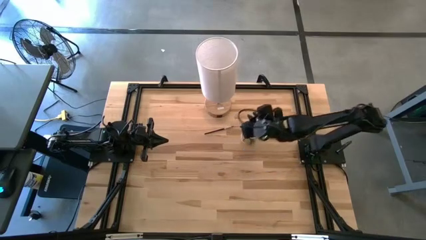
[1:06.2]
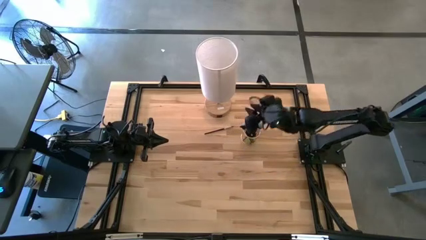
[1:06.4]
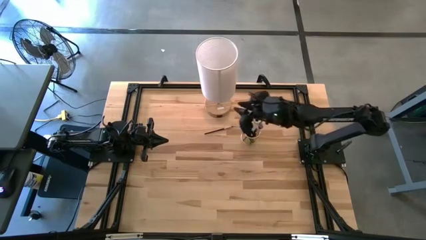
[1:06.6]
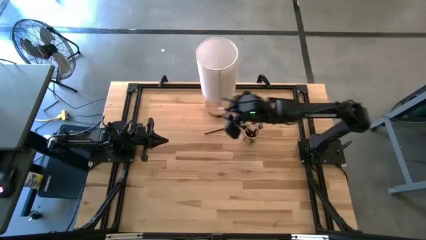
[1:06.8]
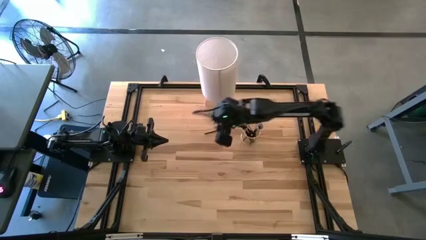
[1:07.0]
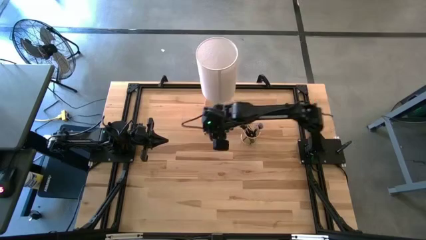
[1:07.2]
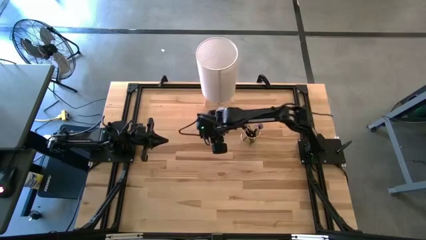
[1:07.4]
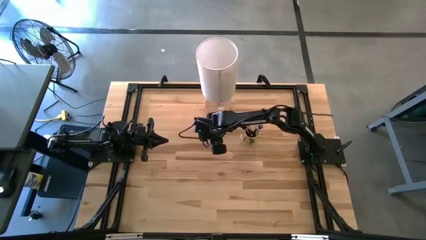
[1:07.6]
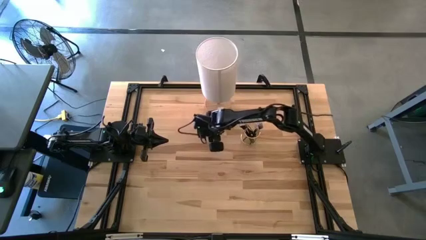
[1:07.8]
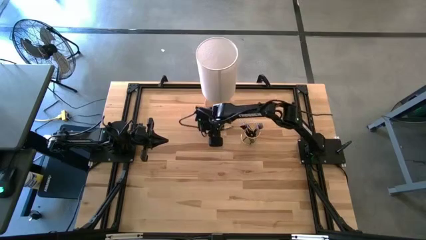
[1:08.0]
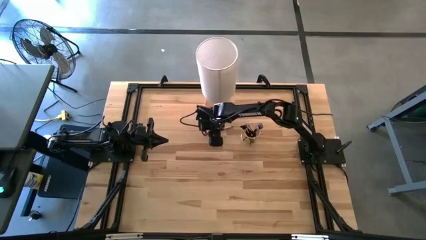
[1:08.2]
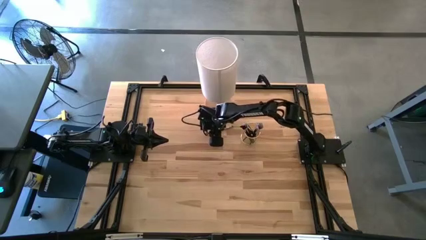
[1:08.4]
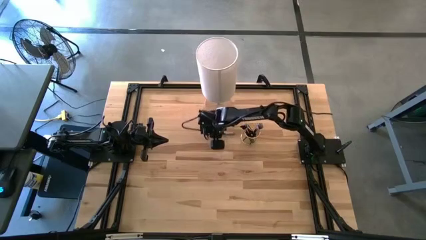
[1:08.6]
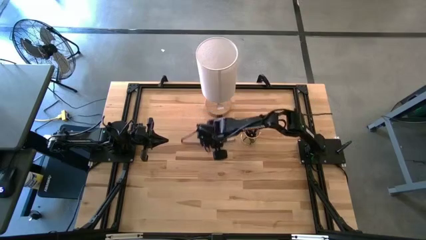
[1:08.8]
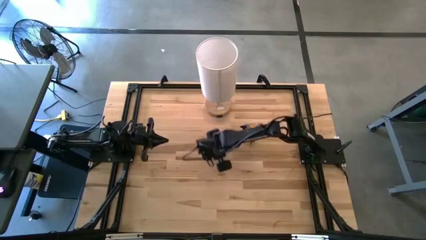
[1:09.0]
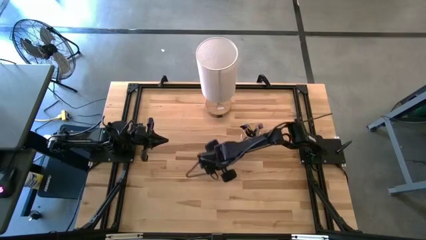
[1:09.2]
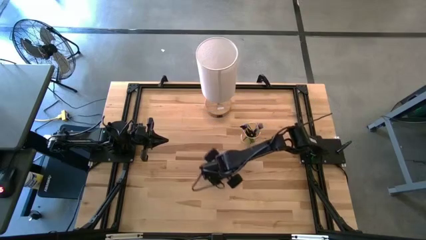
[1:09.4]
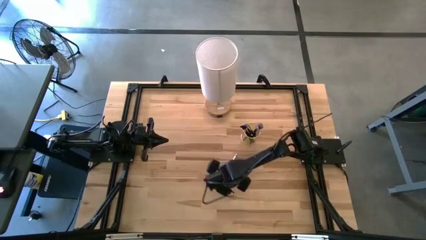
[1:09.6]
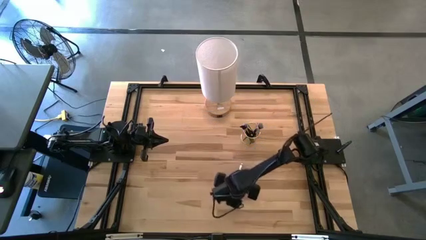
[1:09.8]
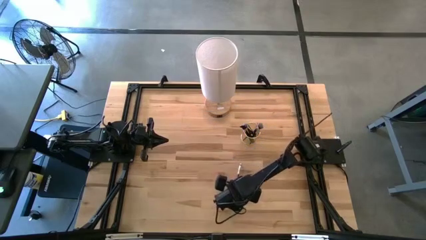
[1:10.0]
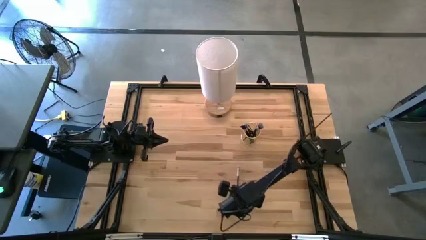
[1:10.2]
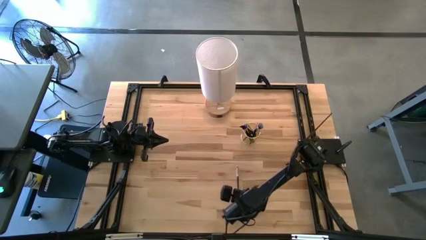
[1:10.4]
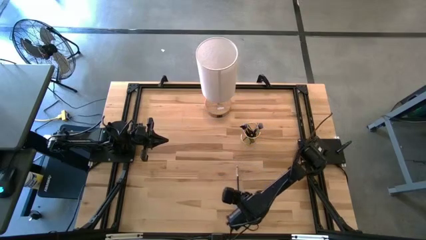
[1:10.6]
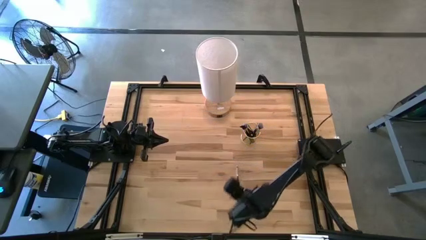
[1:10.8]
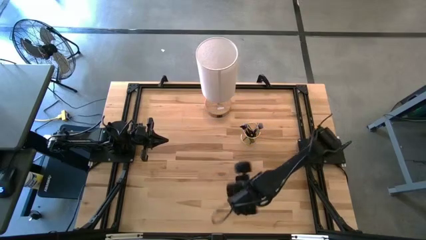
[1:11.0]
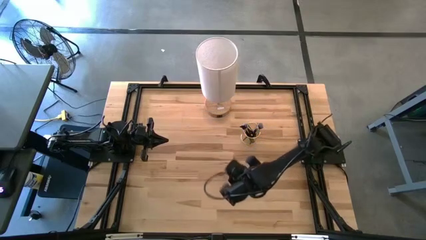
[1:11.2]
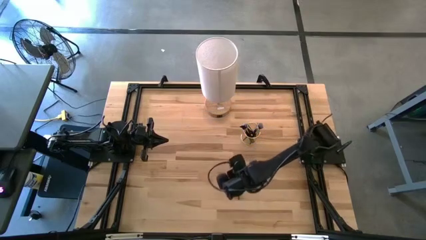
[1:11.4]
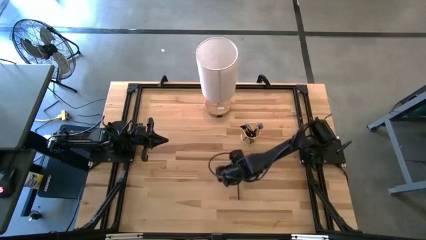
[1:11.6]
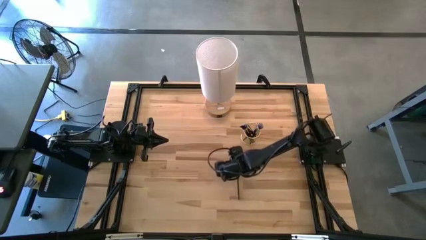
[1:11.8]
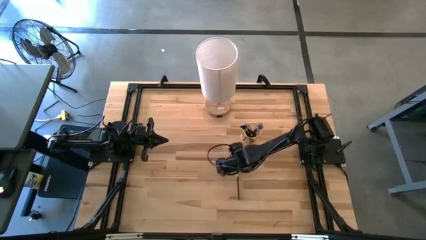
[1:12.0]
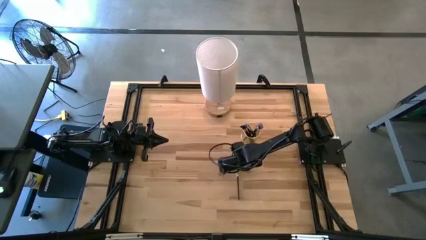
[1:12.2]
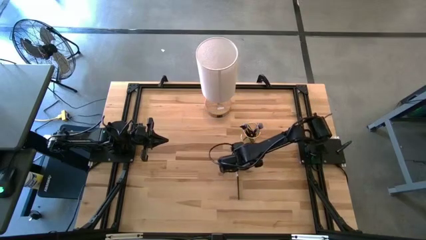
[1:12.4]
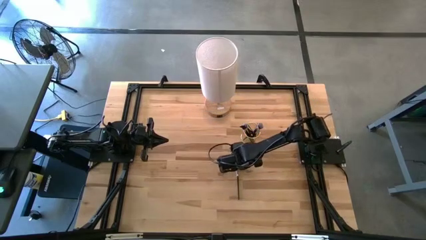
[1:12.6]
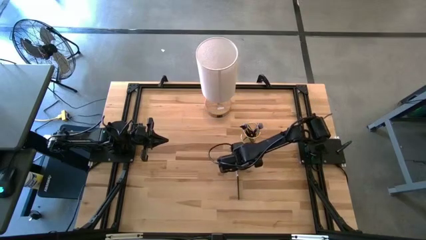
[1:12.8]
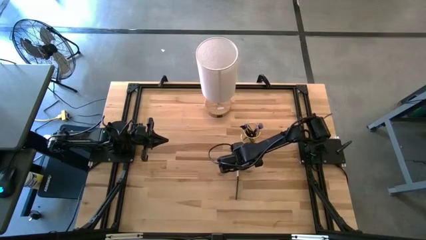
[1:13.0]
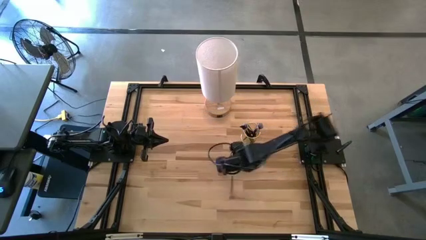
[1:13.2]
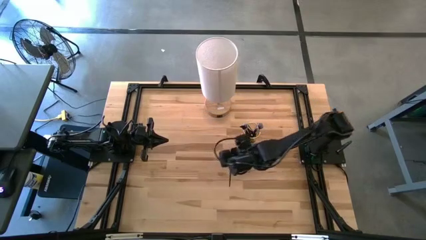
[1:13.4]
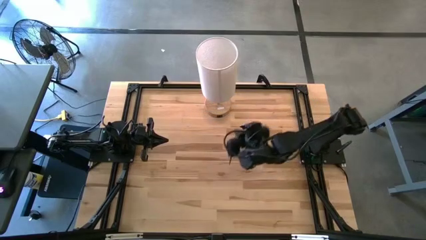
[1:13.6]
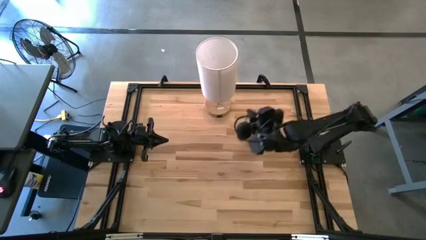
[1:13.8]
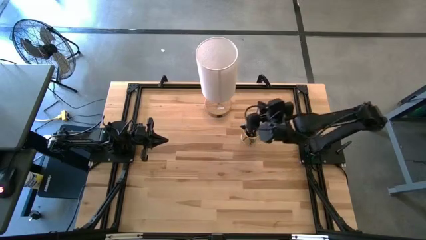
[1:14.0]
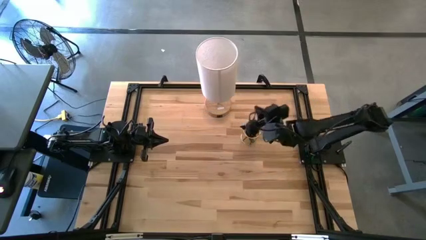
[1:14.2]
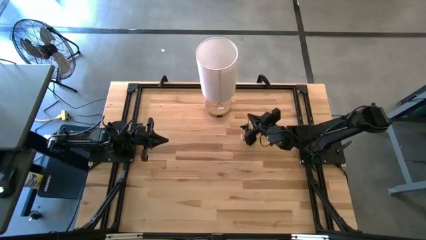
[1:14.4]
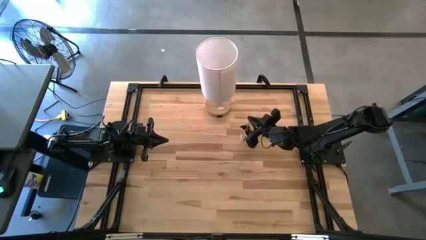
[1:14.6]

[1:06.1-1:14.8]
Task: Pick & Place Makeup Brushes
Put the black eyeshadow brush into the makeup brush holder

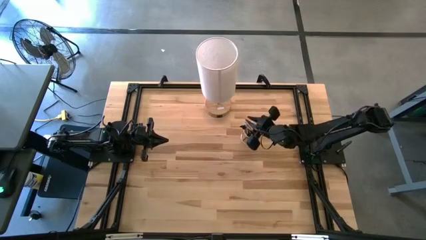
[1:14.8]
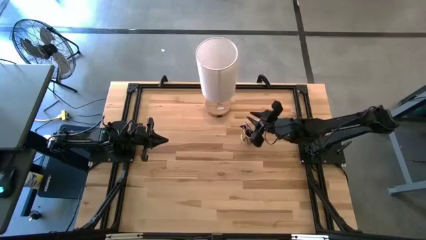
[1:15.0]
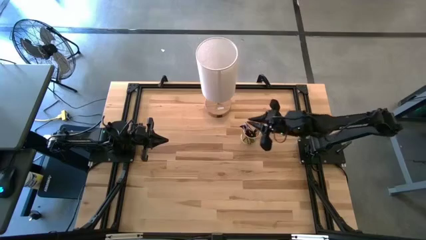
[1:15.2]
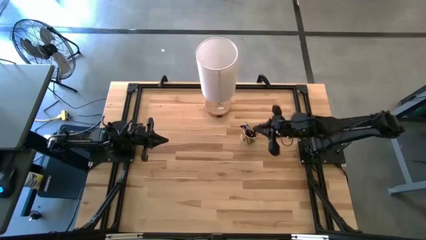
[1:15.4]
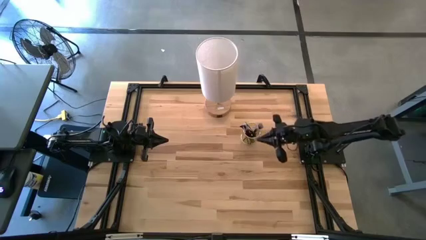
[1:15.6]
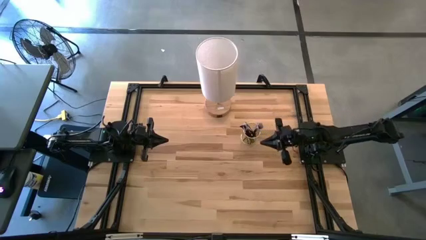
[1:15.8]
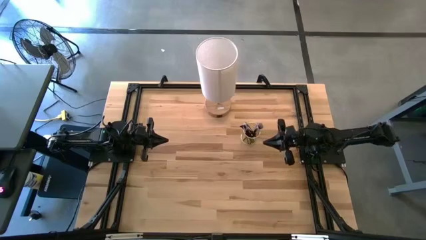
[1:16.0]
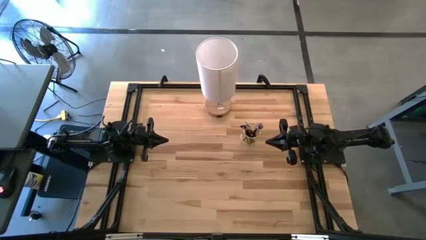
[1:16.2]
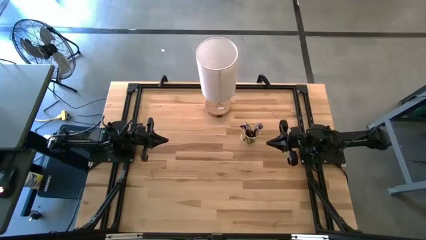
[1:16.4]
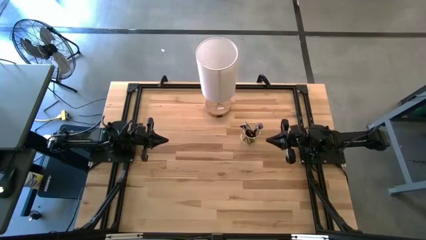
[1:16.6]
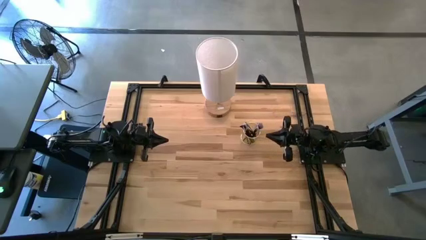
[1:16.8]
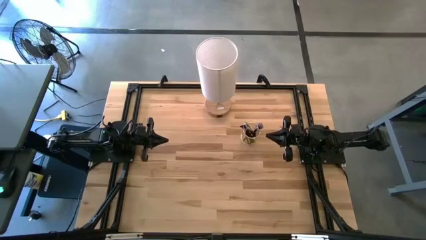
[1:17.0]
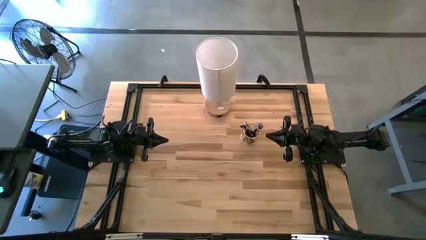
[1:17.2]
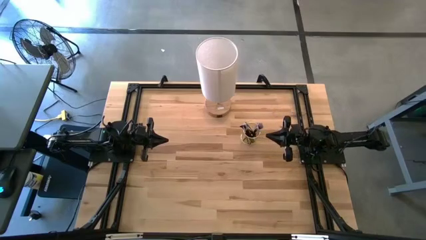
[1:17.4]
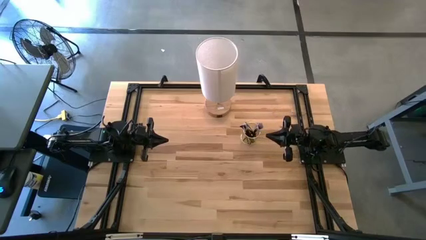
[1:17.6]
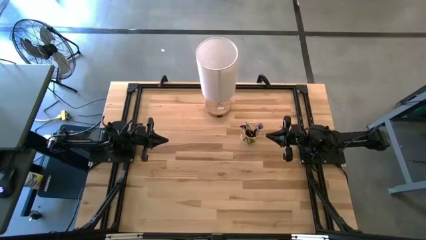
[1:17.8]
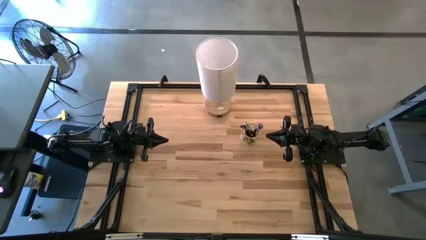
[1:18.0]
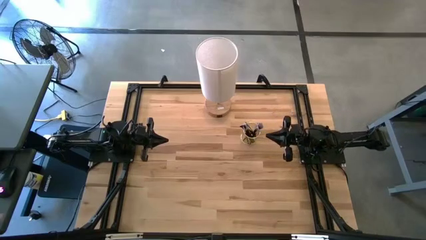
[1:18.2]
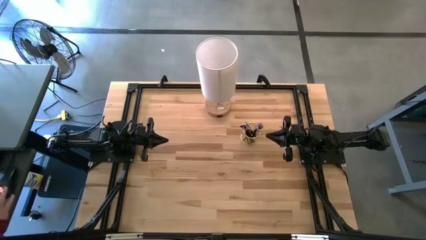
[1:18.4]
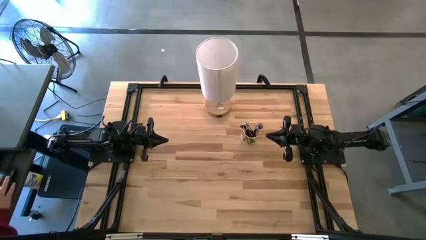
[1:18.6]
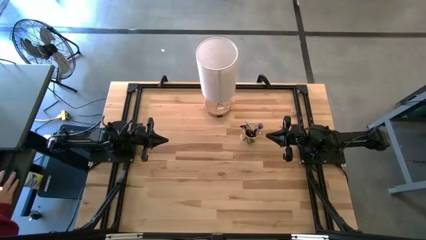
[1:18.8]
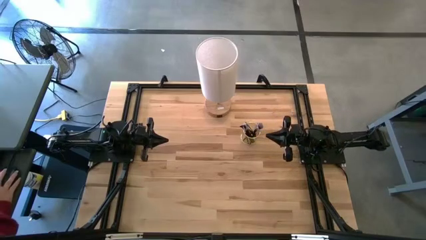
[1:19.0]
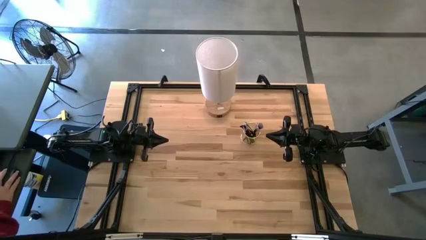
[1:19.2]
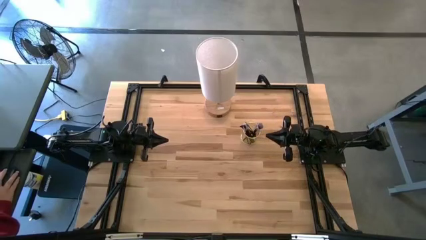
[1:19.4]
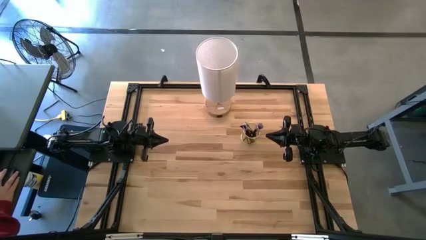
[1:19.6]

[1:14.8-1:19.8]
Return to Home Position

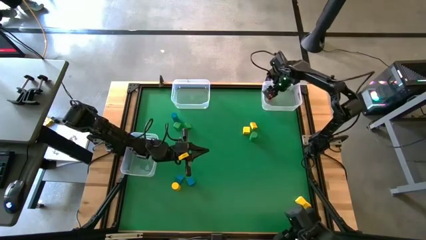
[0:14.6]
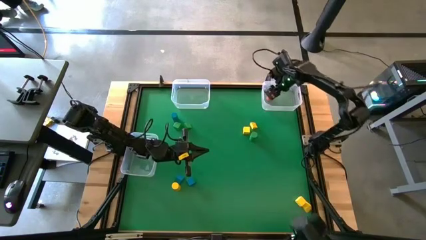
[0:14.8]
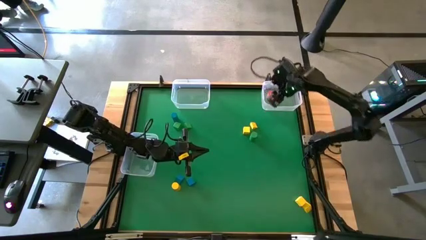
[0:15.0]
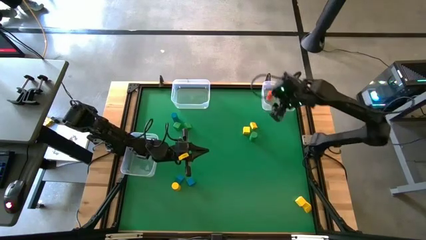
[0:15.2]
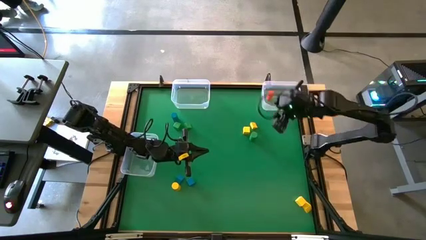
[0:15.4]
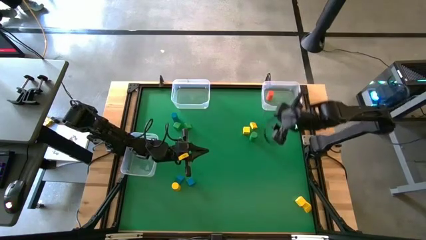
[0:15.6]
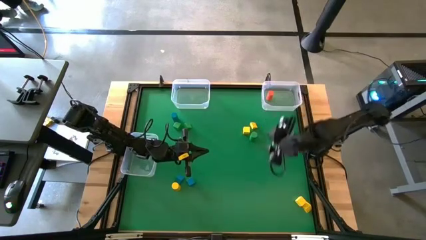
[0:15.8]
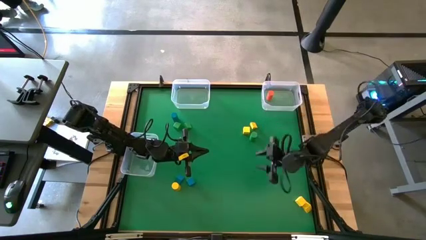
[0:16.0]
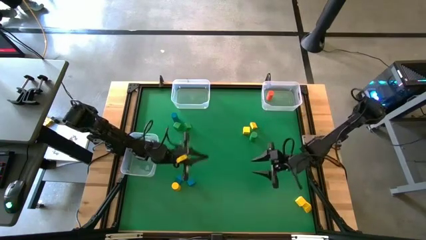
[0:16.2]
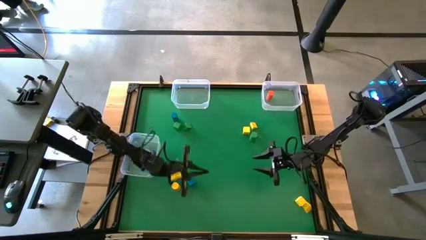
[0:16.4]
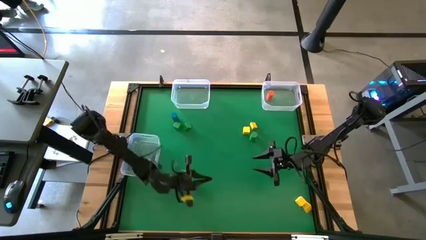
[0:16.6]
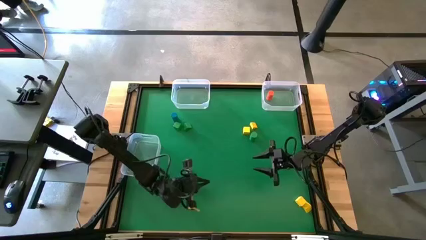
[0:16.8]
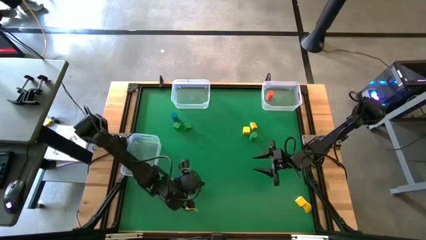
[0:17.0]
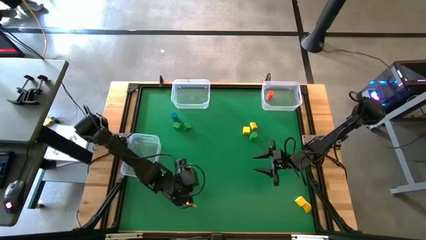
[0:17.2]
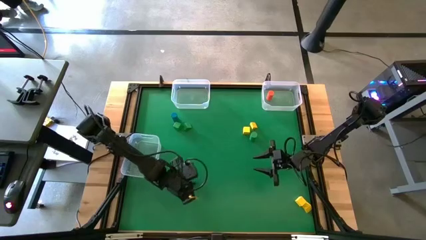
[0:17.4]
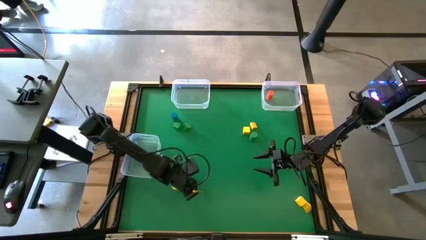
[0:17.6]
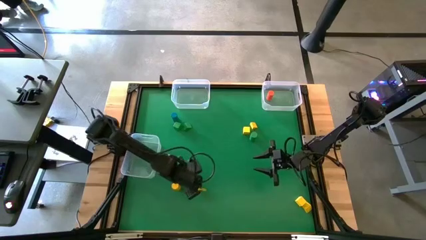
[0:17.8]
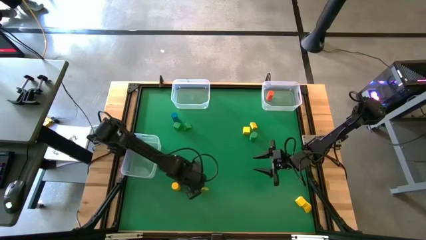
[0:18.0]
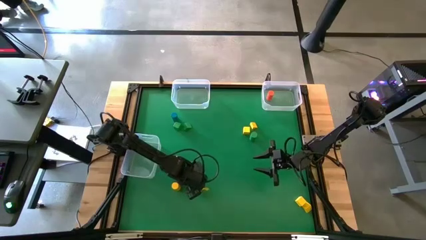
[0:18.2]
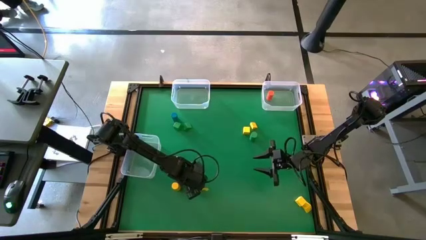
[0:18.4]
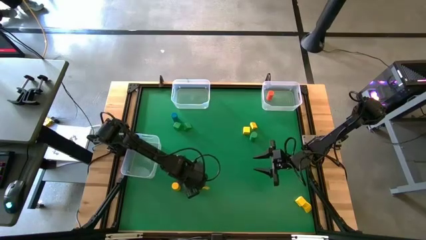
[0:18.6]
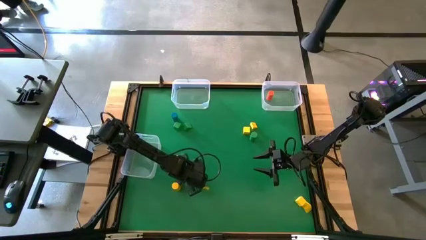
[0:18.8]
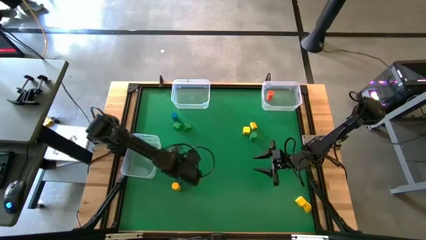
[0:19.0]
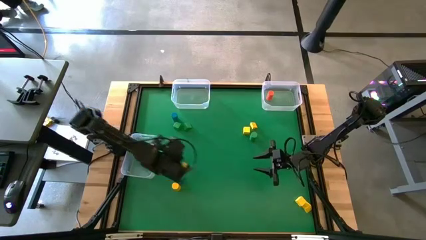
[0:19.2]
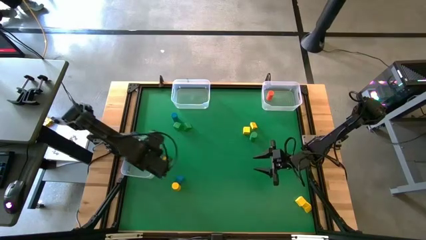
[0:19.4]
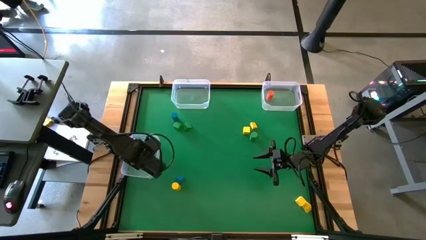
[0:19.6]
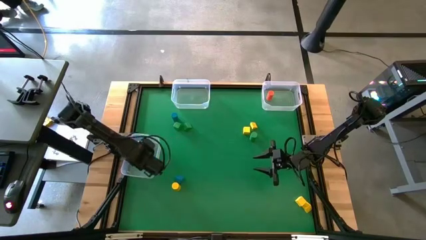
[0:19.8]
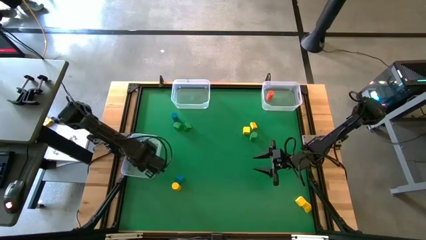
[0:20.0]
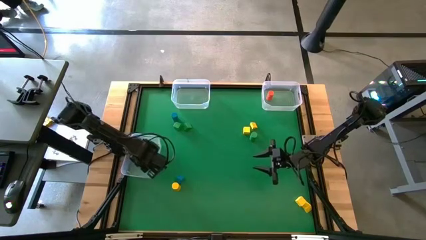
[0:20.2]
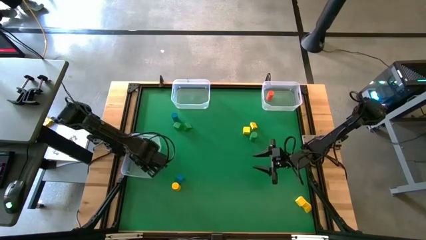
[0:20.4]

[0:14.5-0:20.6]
Task: Sort blocks by size
Put the blue square block into the bottom transparent bin
